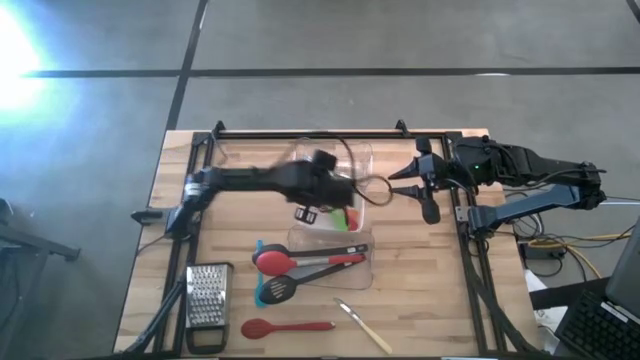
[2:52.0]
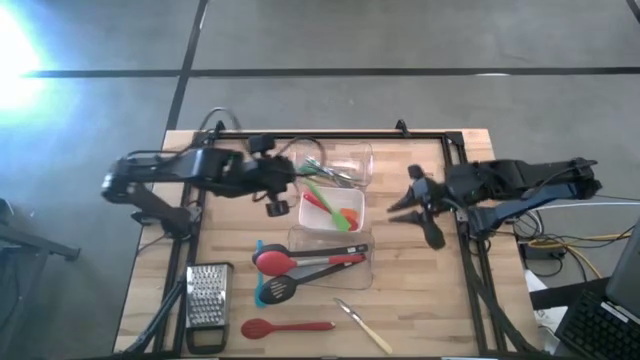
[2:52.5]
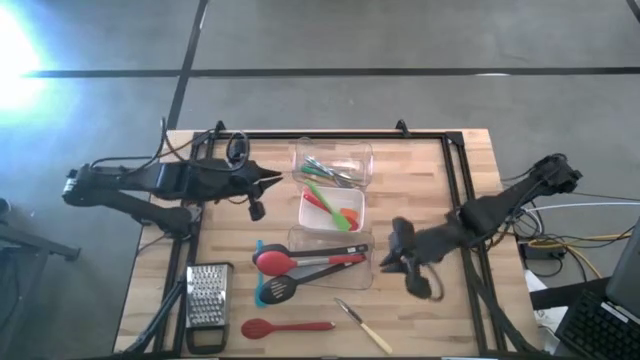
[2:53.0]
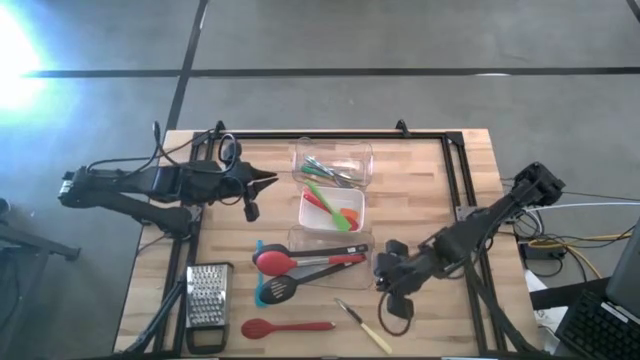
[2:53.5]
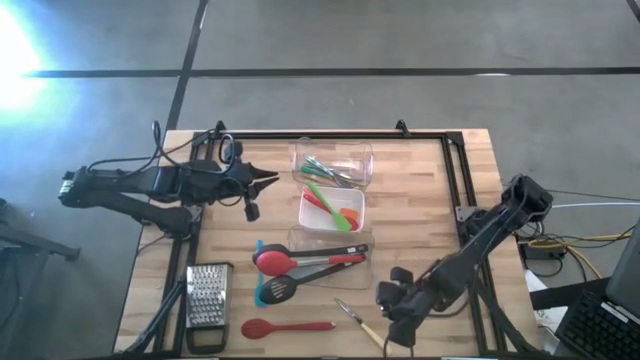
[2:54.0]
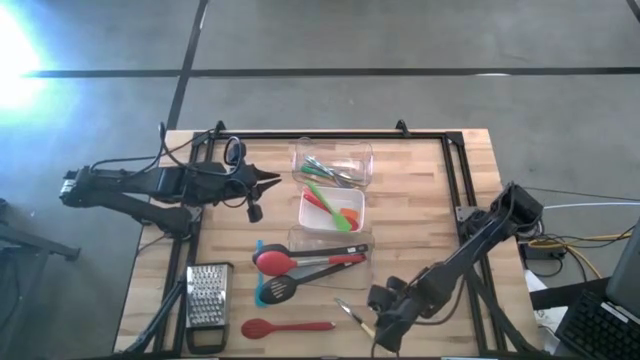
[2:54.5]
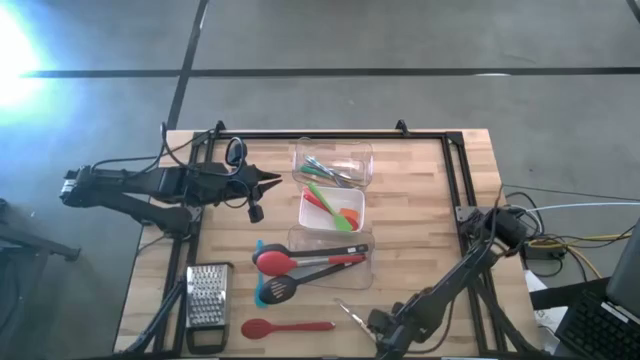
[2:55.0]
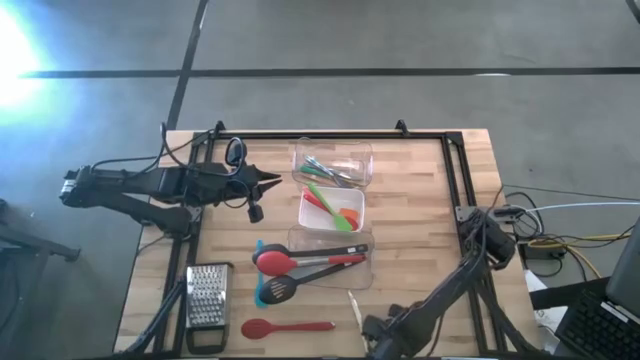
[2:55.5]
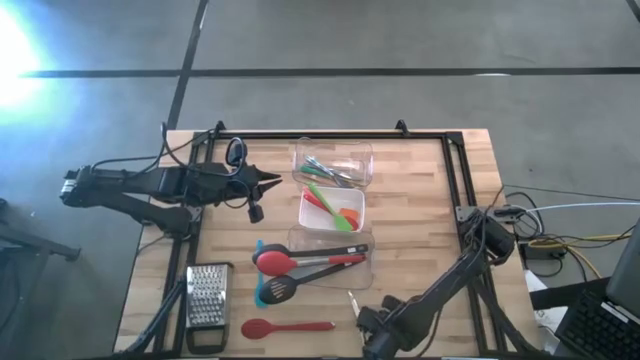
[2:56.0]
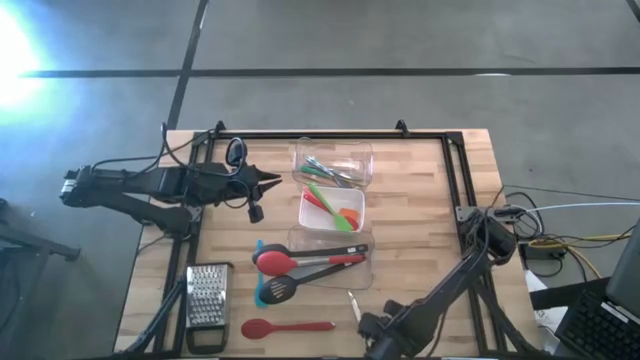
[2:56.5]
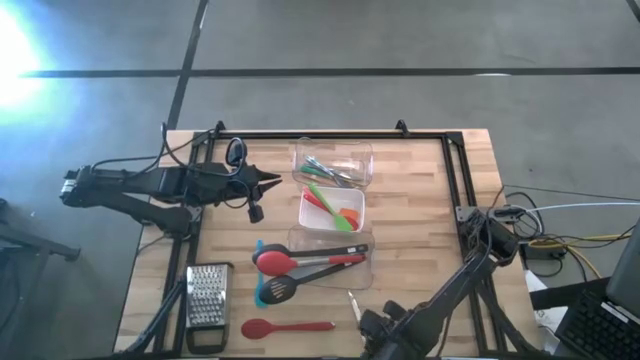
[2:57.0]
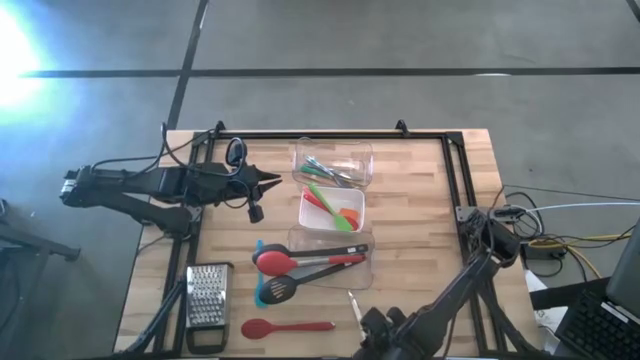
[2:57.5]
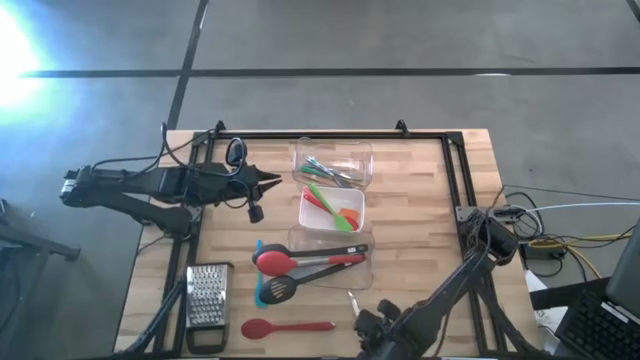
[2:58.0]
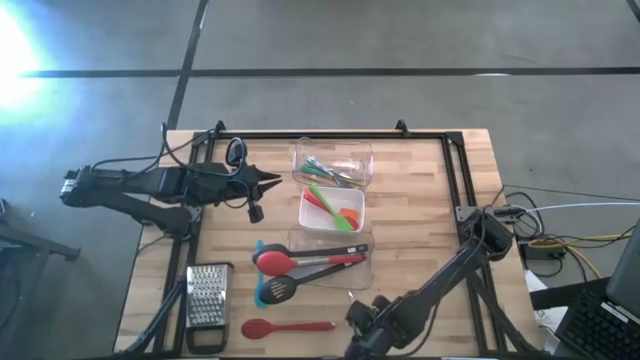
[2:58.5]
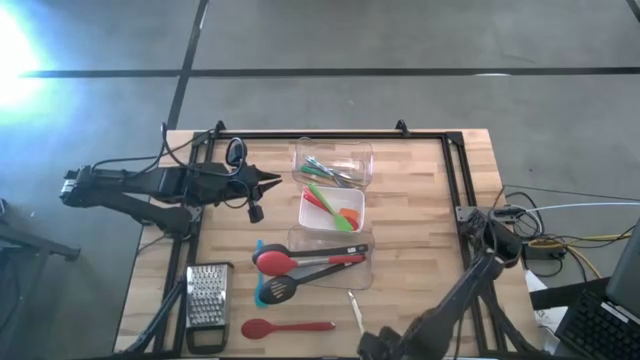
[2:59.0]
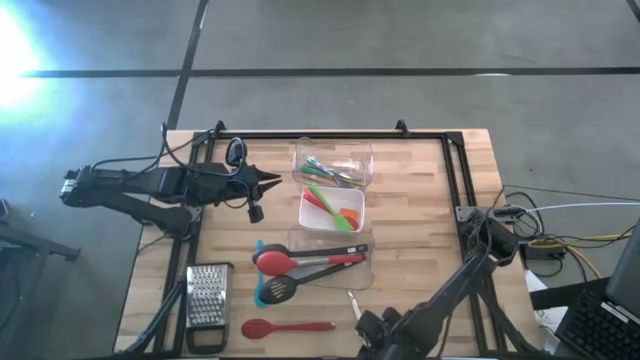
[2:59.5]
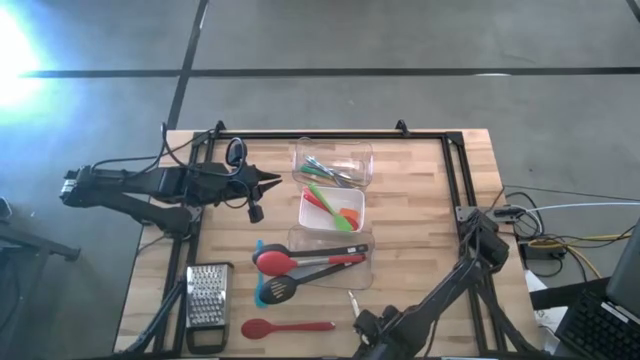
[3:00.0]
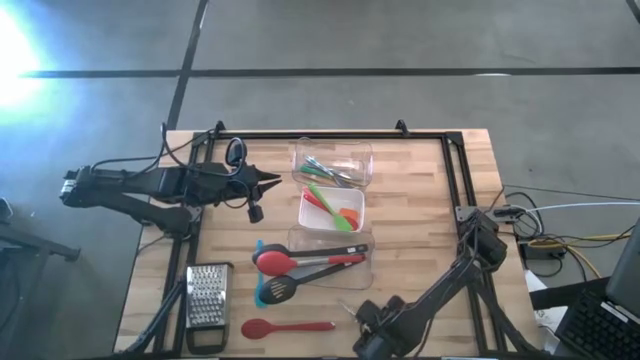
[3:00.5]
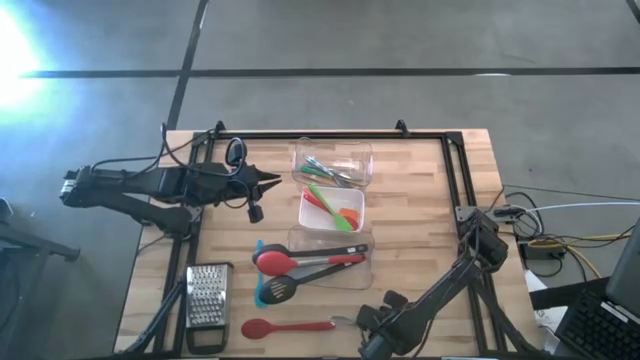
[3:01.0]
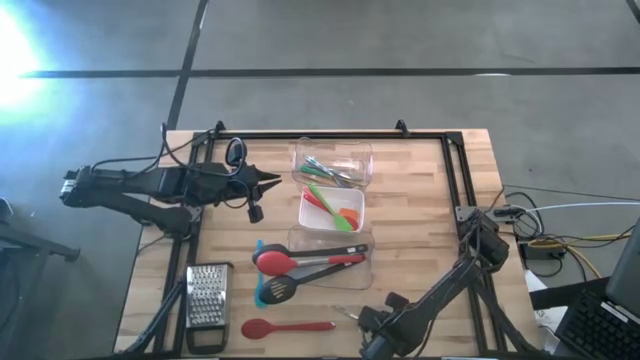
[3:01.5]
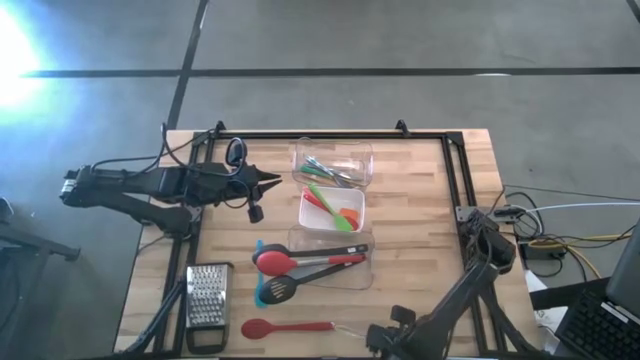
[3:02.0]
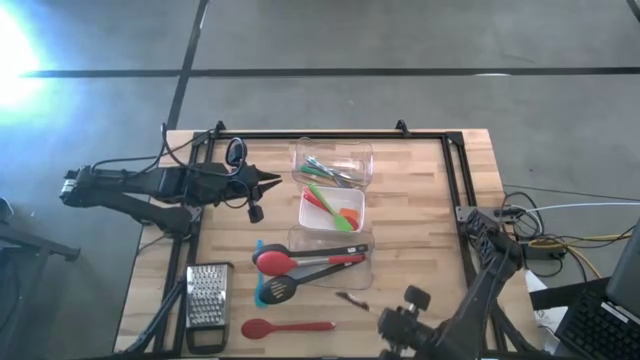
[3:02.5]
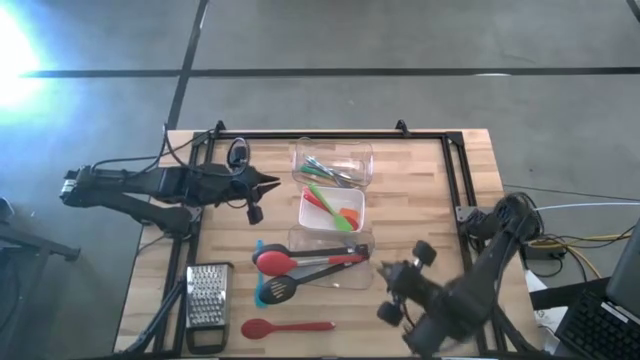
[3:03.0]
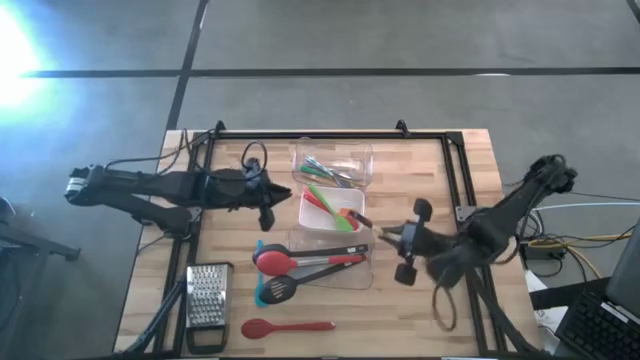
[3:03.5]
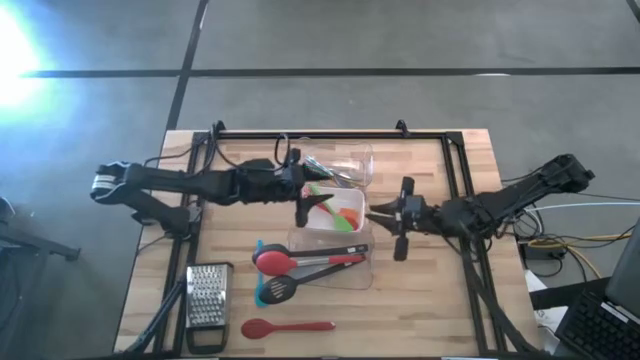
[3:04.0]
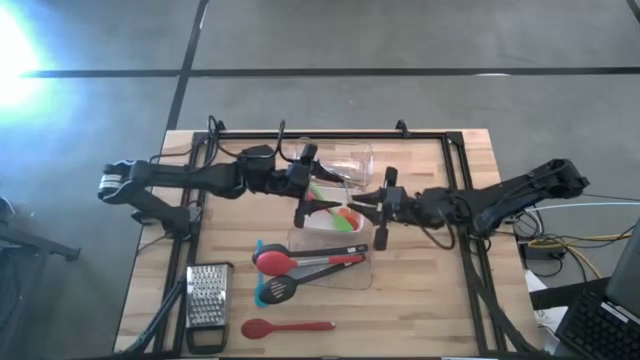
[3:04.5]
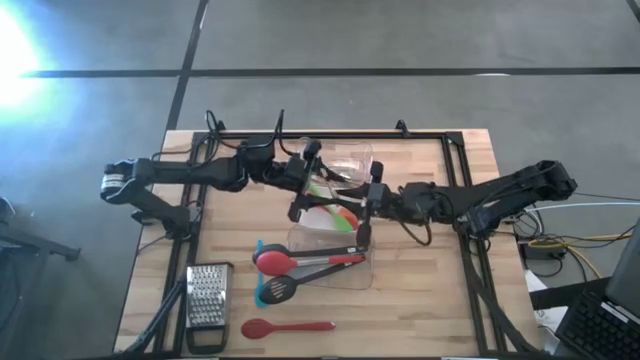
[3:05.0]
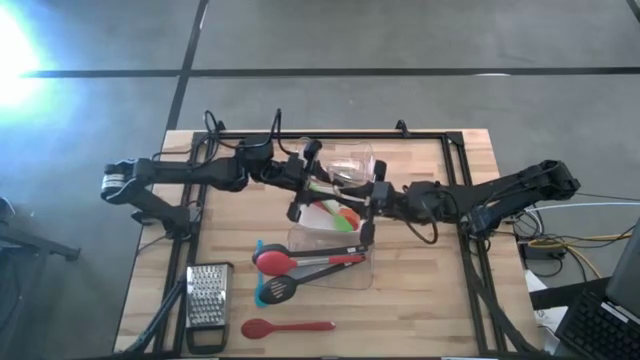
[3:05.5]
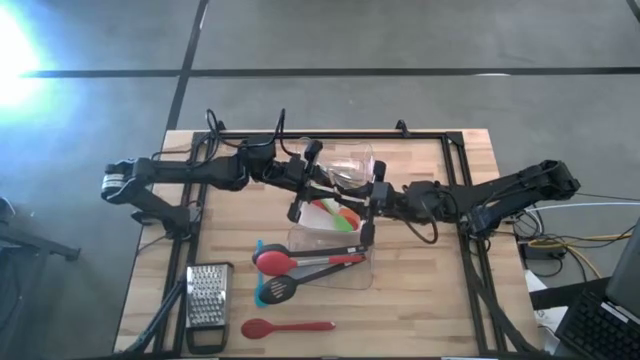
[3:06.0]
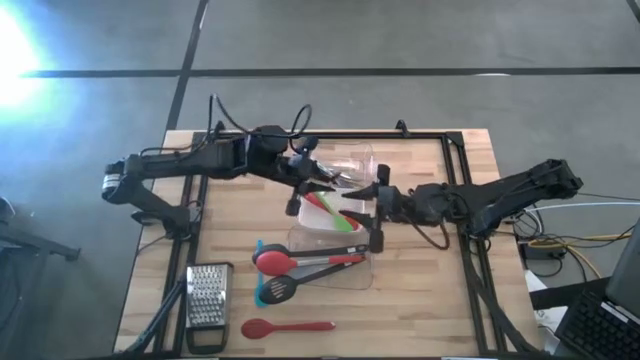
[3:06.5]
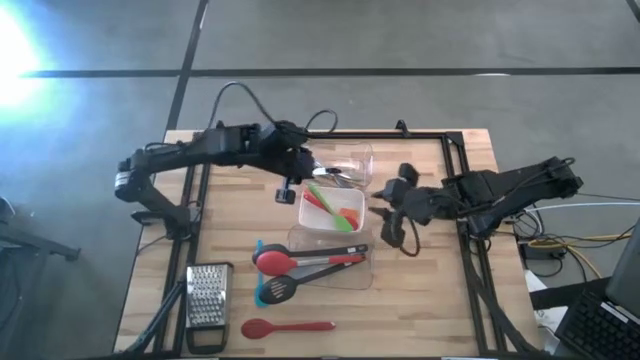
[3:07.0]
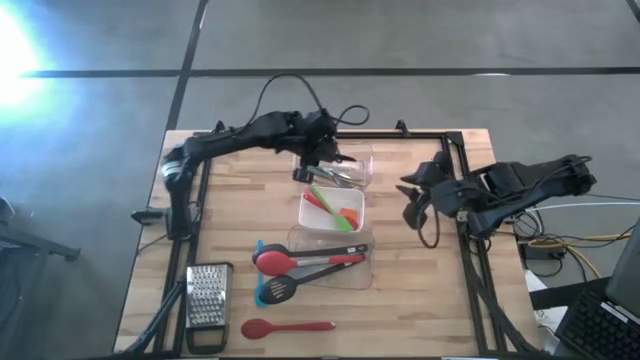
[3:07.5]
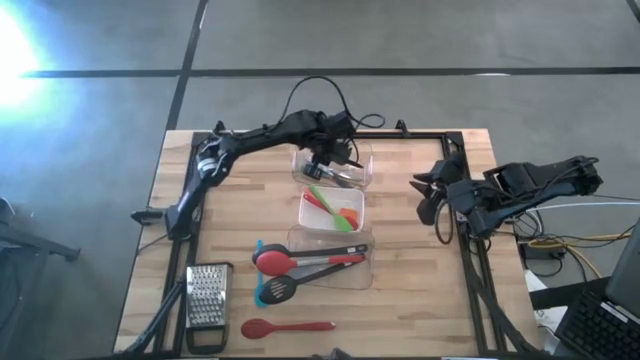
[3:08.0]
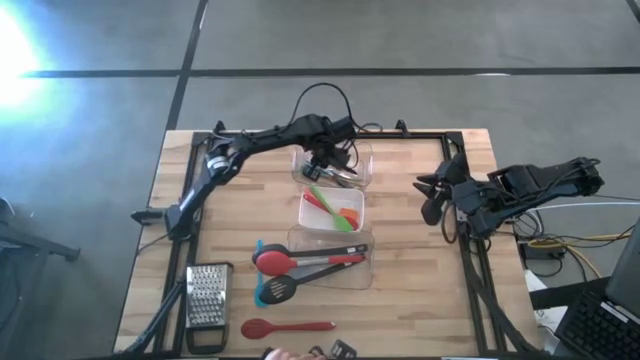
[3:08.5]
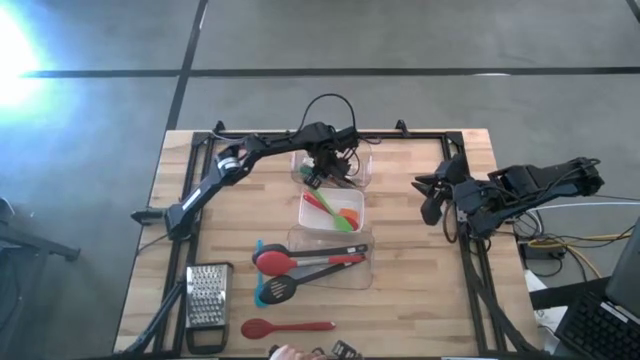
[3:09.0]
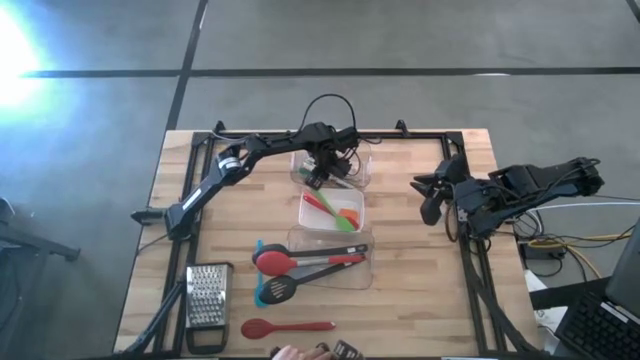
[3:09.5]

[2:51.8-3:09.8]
Task: Pick & Place Kitchen Items
Put the yellow knife into the top transparent bin

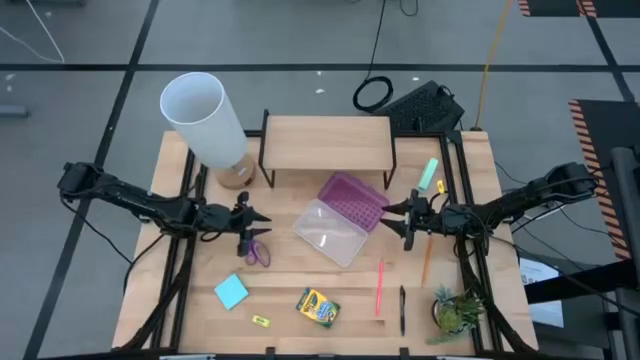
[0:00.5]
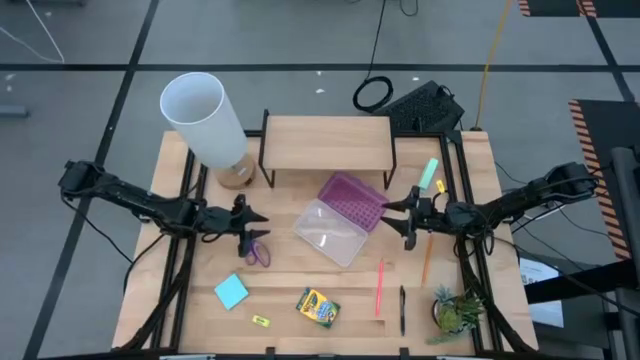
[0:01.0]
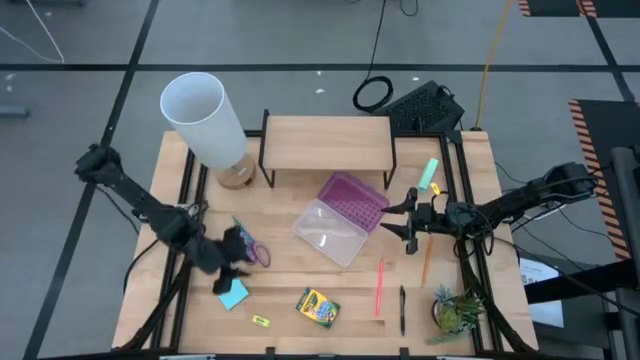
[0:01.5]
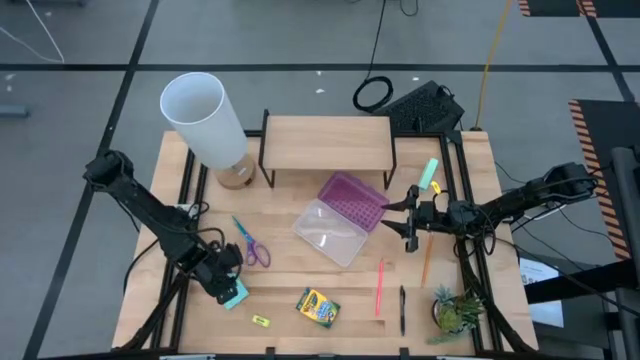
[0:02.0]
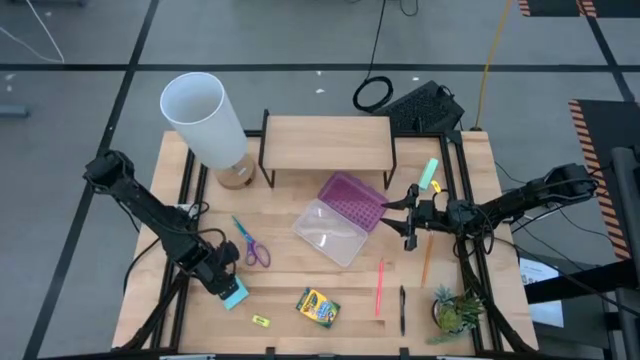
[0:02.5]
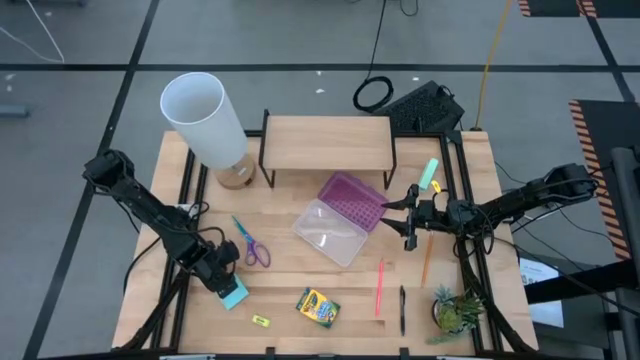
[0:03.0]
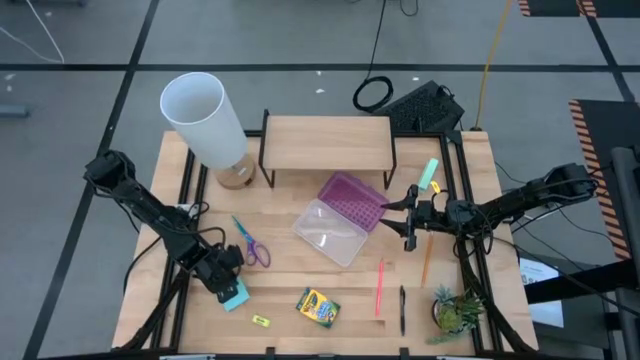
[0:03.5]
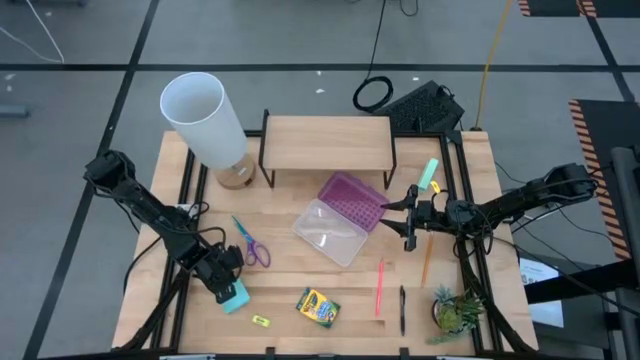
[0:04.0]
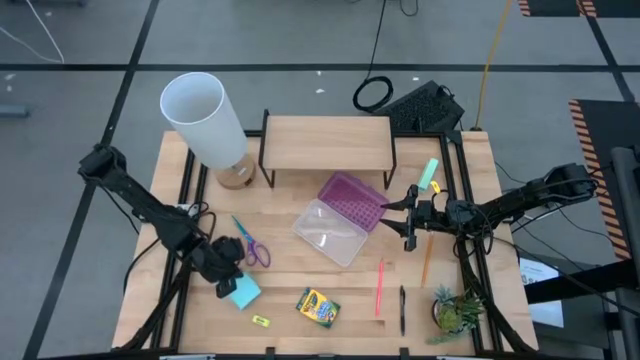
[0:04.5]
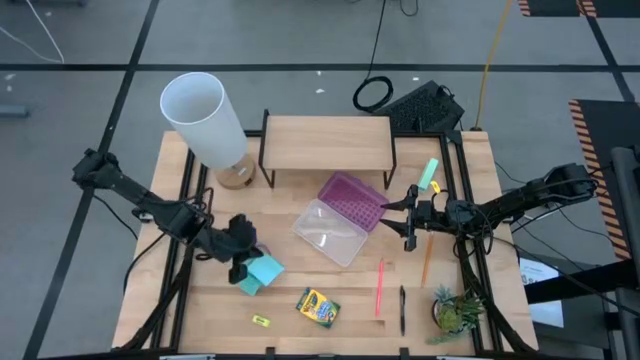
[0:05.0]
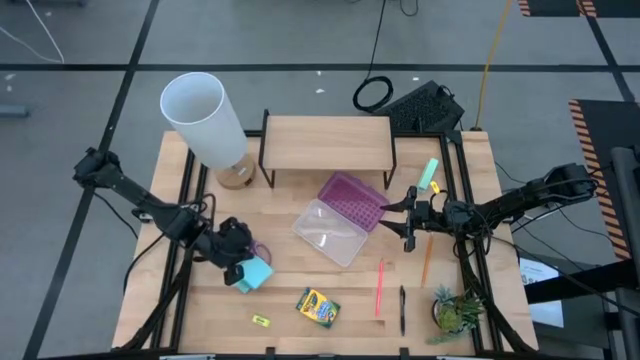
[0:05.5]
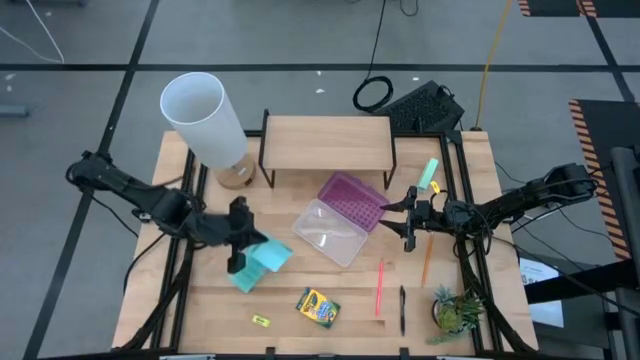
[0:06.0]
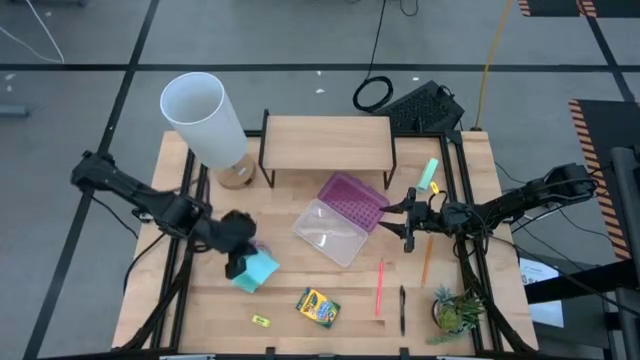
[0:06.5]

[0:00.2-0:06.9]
Task: Pack school essentials
Put the sticky note into the supply box
